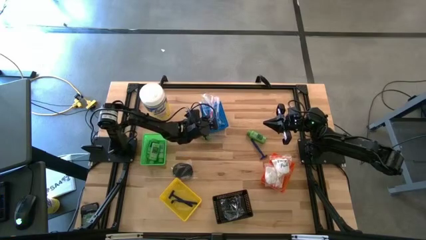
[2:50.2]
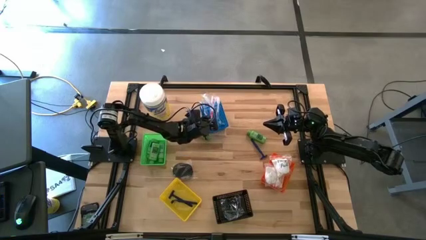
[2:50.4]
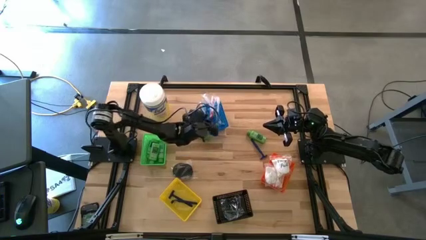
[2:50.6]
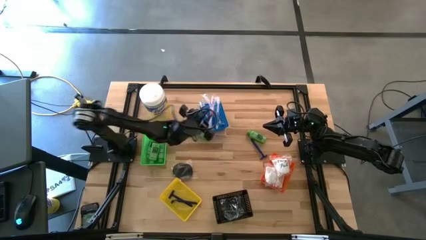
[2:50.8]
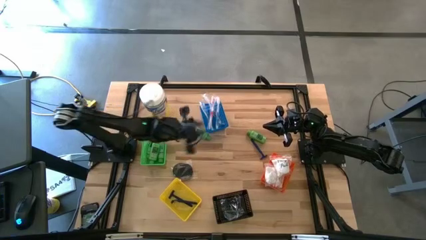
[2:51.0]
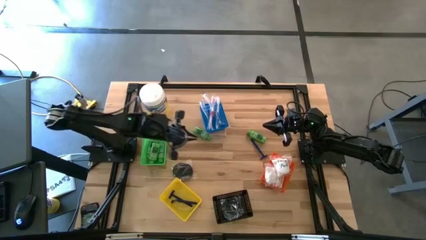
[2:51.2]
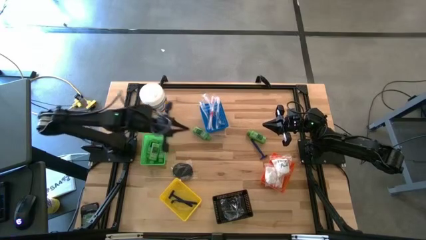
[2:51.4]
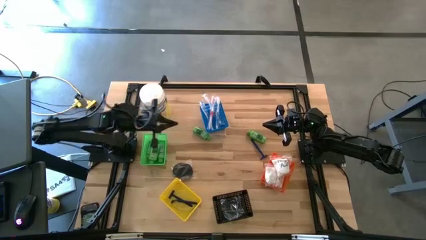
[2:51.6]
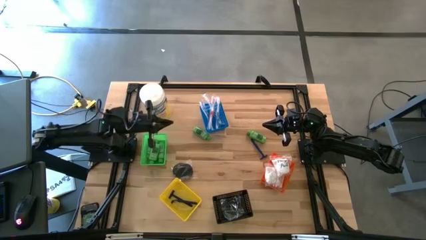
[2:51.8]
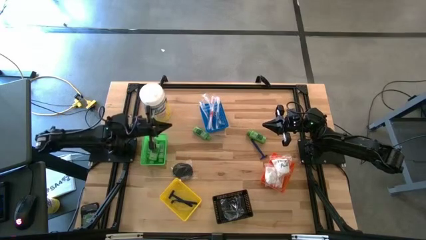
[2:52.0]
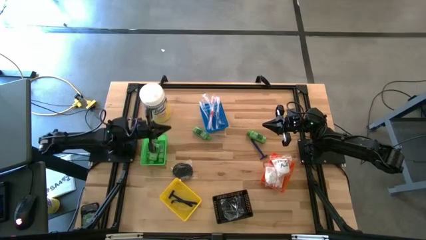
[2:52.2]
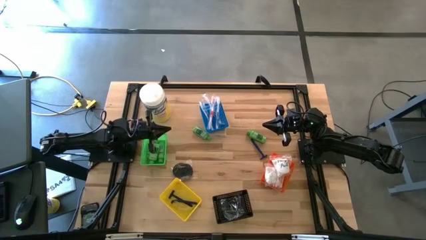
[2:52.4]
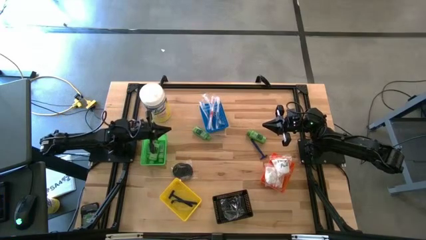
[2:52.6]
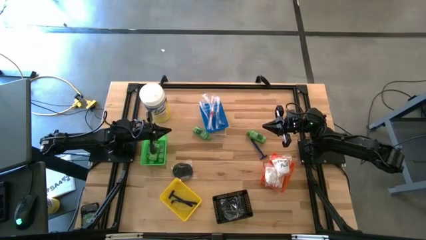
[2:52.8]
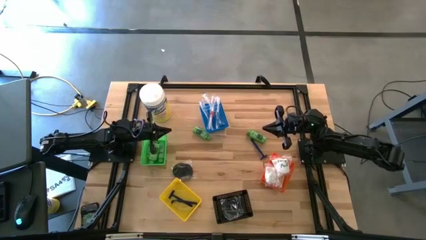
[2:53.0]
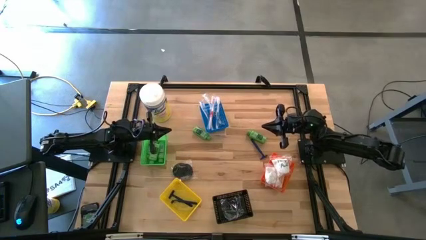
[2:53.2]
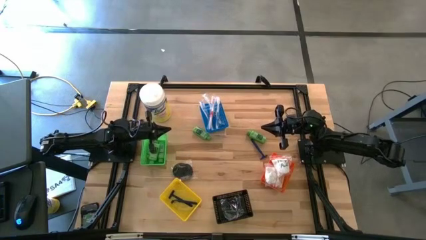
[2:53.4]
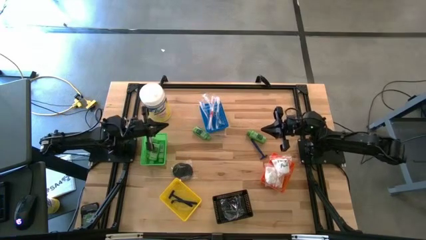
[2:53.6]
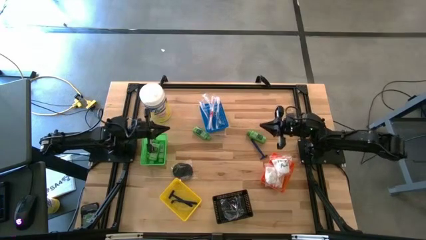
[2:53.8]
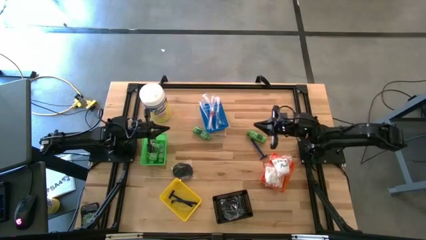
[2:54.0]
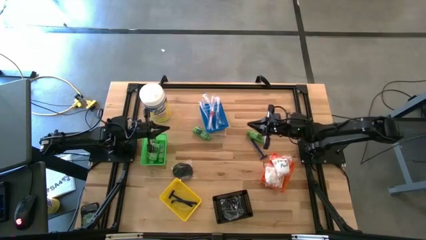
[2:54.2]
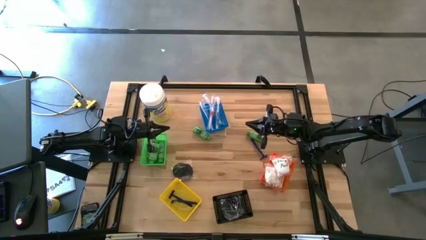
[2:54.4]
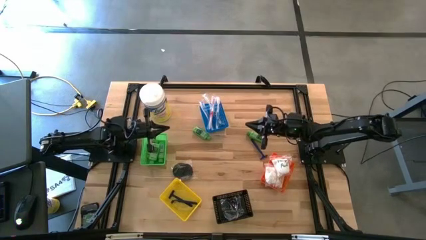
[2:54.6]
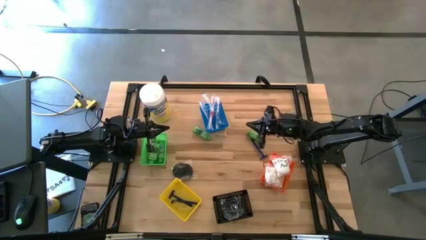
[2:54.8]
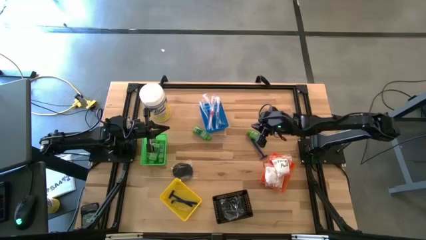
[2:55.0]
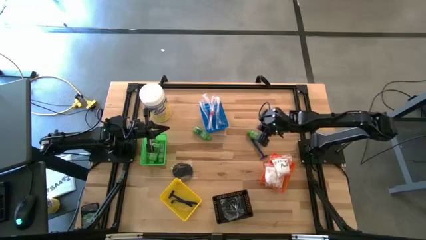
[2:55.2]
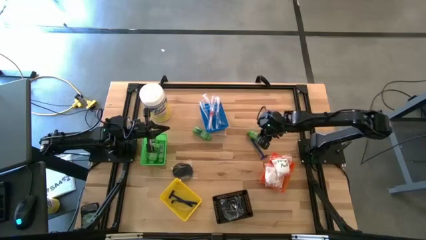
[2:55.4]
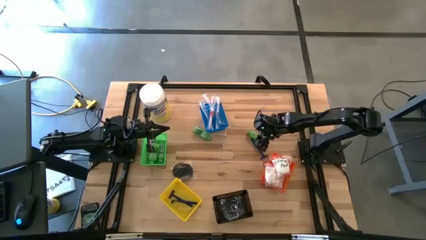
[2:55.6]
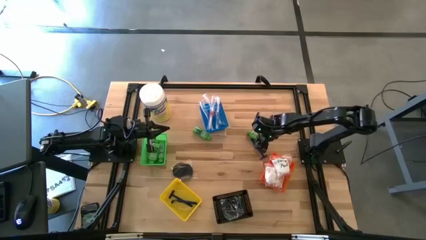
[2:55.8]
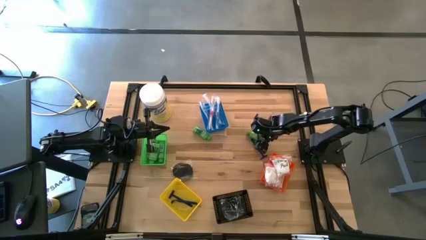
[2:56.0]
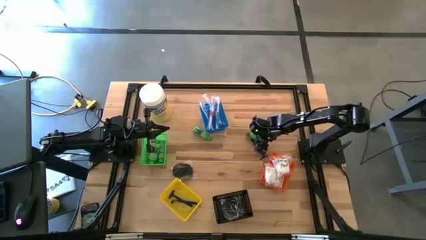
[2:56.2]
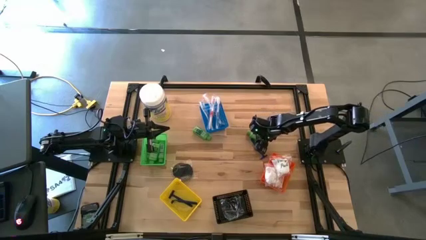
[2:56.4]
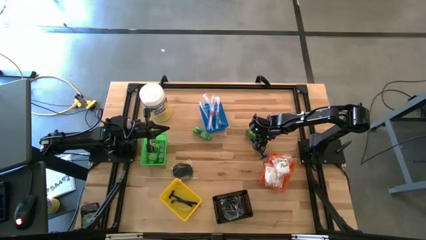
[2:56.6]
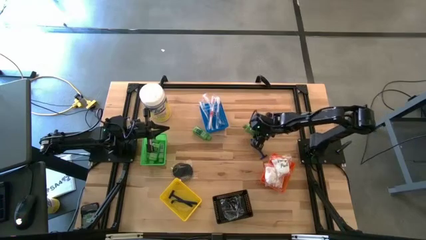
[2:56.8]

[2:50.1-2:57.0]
Task: Pick & Place Travel size toiletries
Put the green shampoo into the green bin

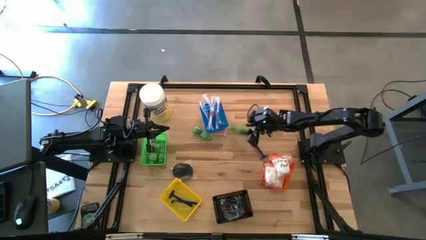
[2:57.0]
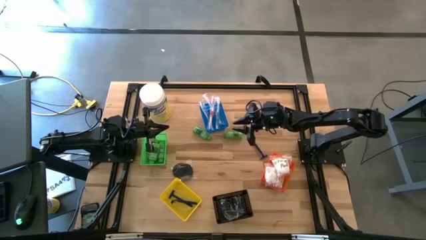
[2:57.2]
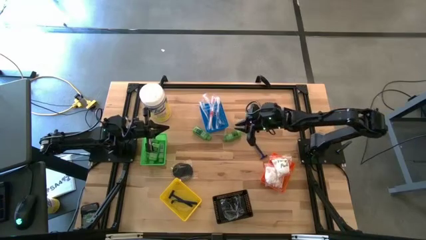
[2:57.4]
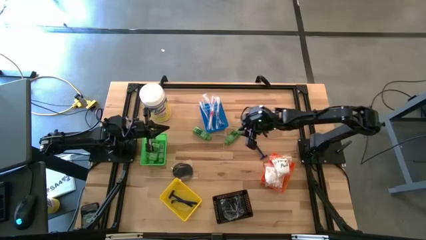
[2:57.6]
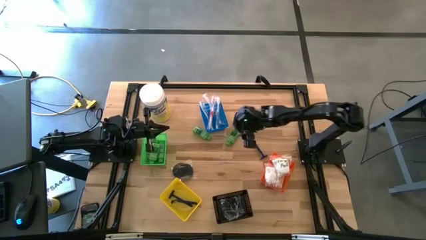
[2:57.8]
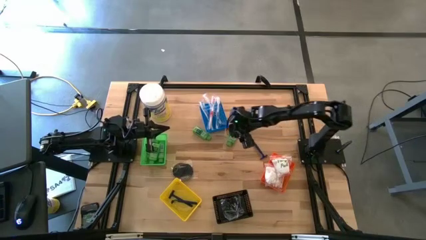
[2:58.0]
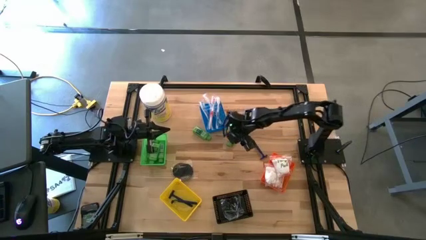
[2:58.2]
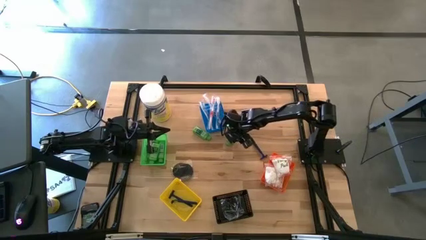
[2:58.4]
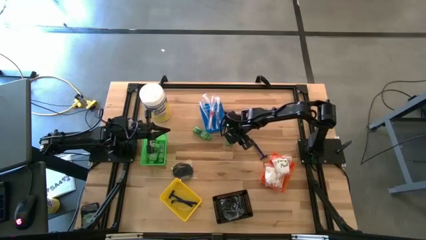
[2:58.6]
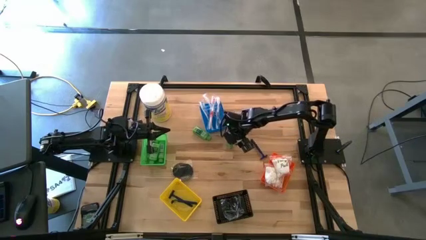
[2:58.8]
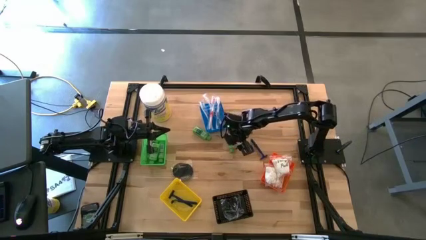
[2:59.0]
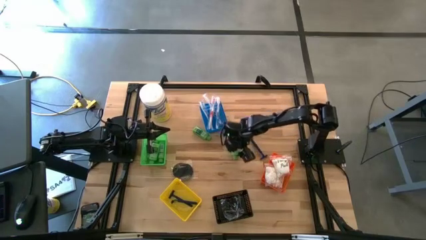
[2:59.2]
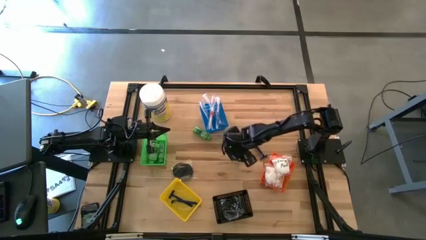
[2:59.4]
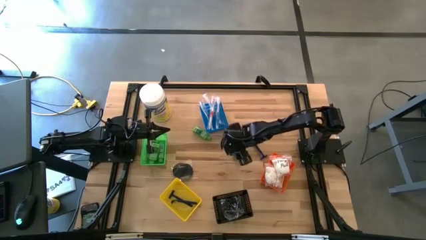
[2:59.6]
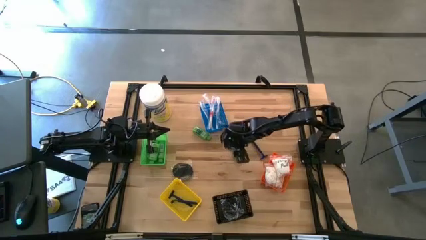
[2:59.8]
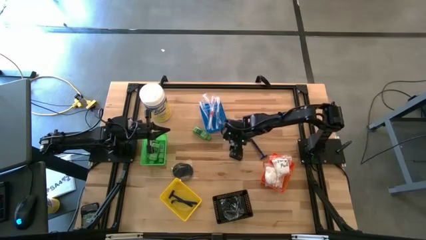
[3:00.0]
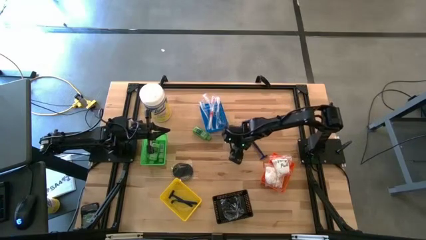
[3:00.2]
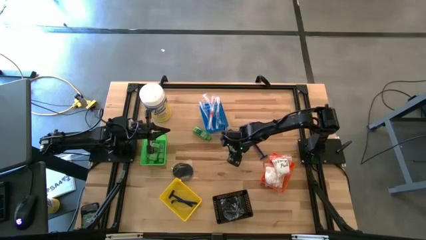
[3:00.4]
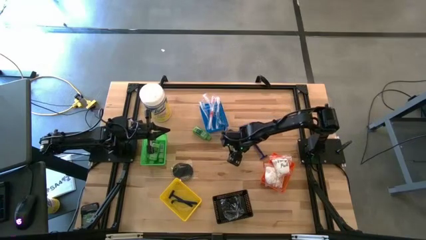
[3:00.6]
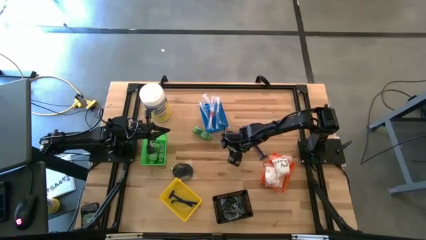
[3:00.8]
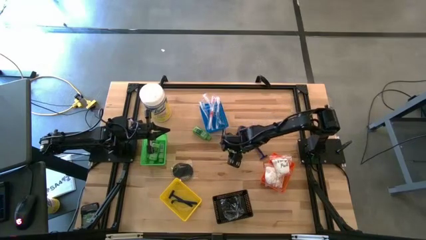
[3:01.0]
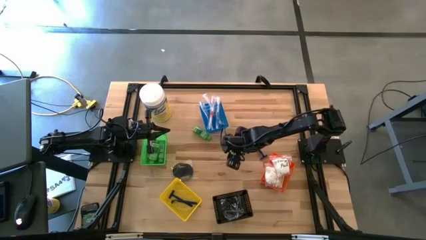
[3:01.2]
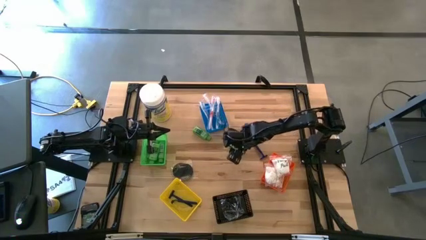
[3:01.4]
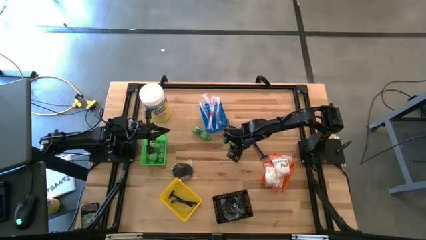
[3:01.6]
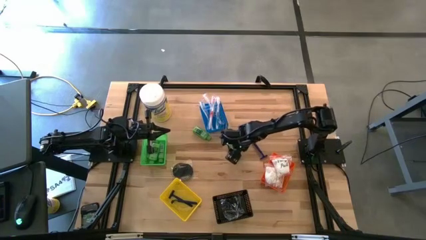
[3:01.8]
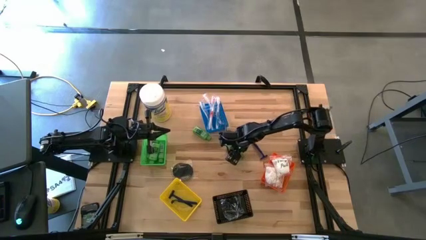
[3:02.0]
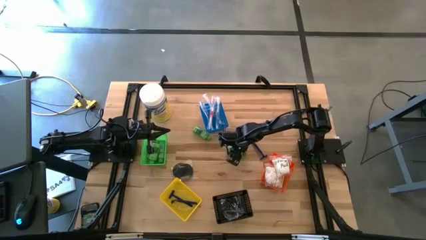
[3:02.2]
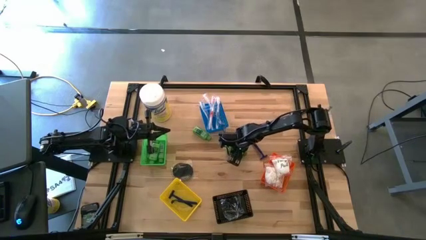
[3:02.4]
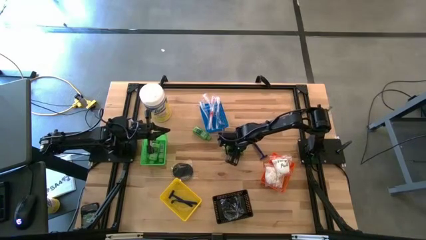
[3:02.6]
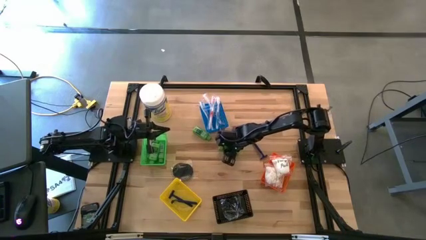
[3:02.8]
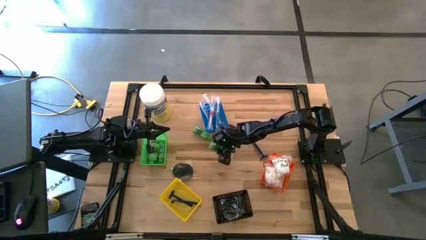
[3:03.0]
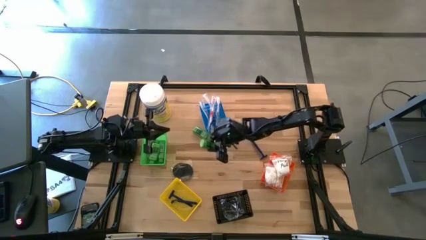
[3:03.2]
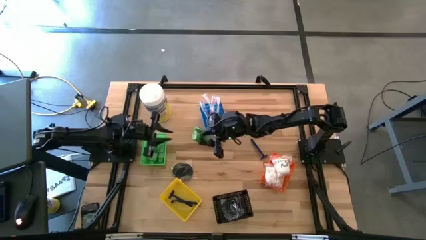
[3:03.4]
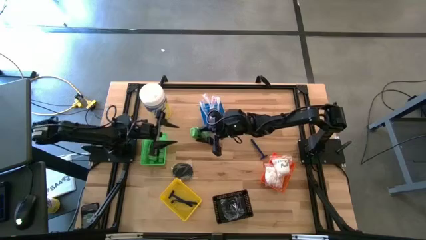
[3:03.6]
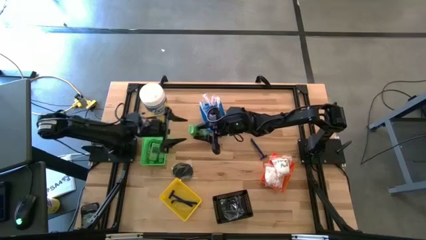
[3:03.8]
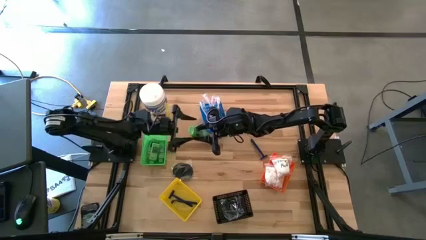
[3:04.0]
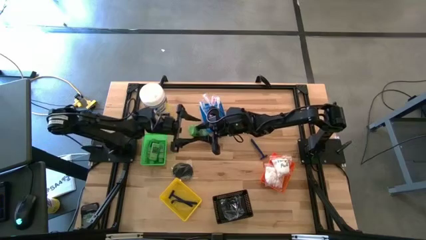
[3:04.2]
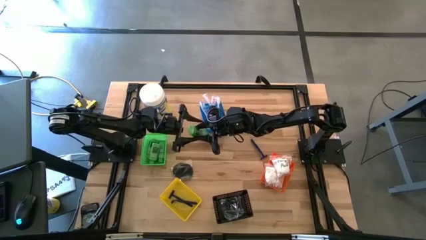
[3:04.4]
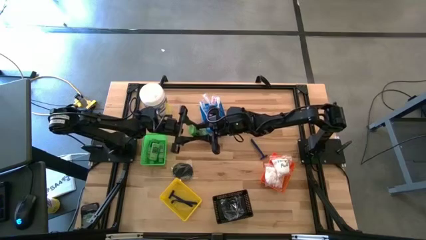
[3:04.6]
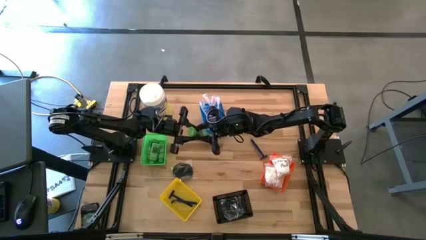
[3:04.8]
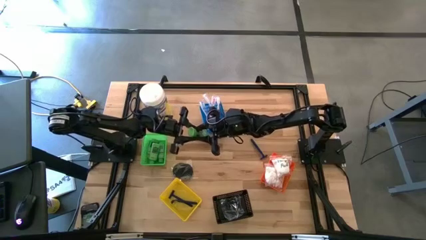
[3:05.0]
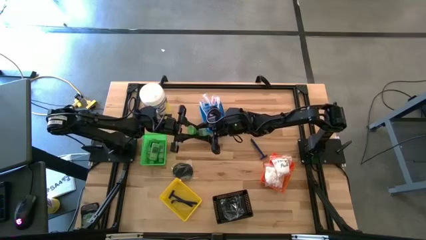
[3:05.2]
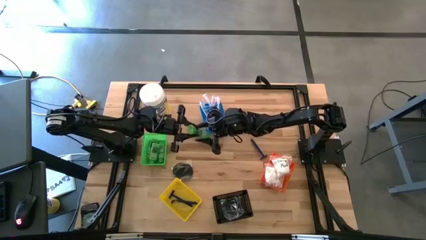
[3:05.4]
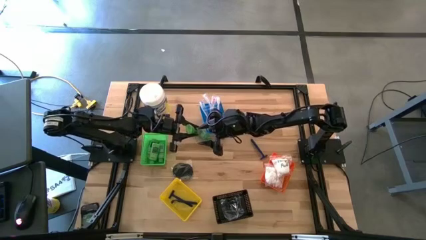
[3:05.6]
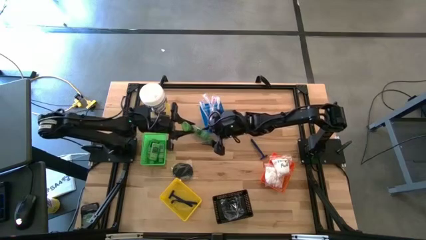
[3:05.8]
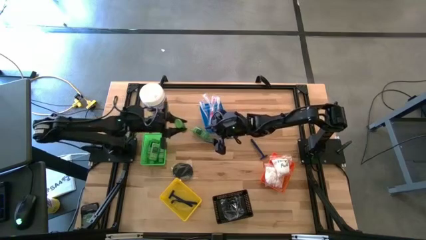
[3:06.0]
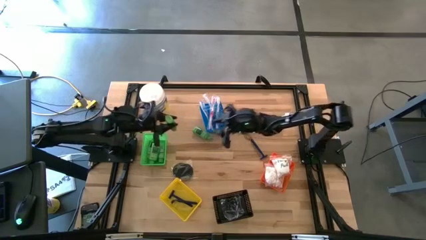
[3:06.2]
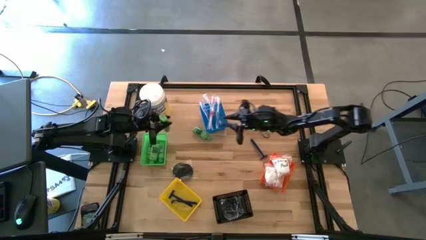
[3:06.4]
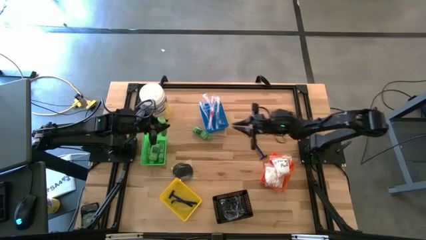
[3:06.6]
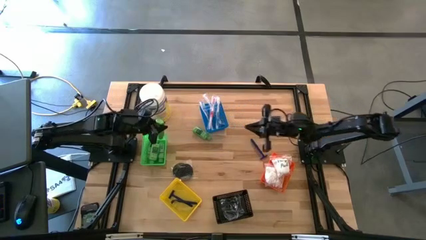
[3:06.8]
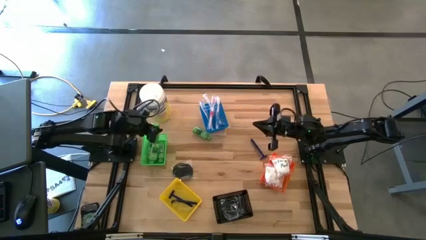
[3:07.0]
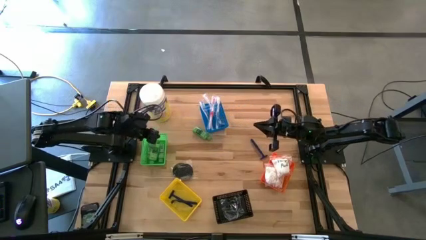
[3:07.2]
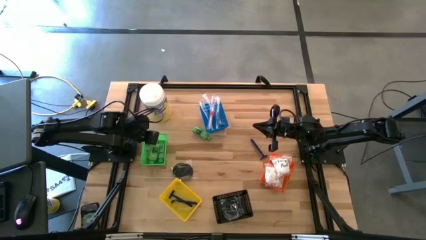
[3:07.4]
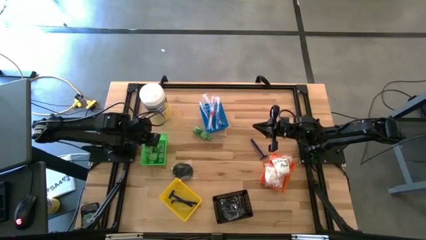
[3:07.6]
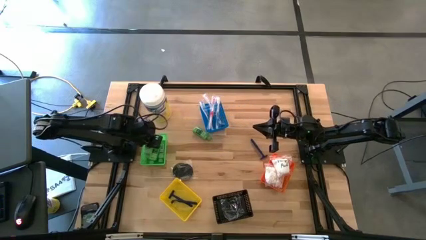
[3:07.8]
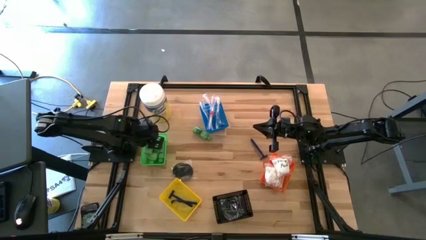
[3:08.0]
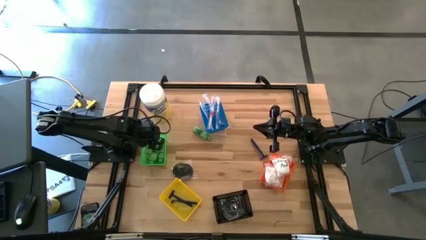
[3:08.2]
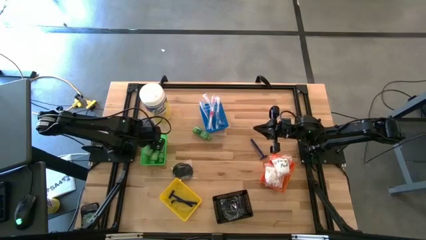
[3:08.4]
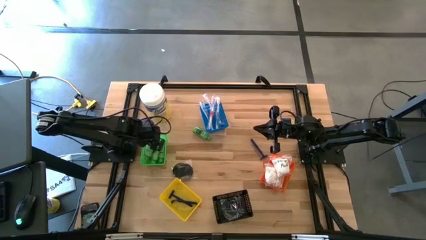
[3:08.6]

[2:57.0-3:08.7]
Put the green shampoo into the green bin
